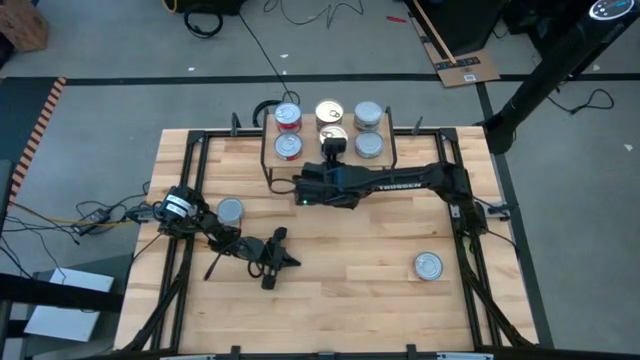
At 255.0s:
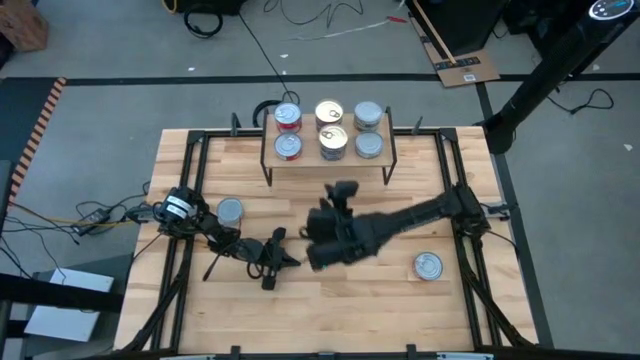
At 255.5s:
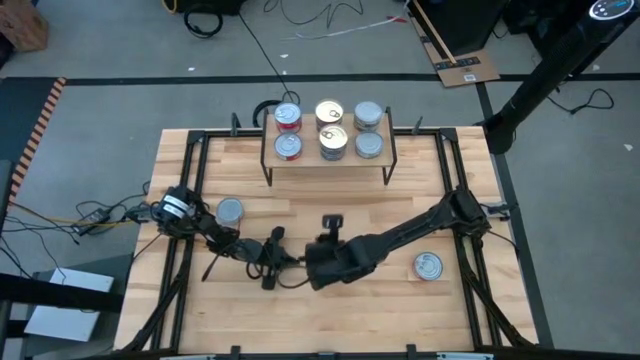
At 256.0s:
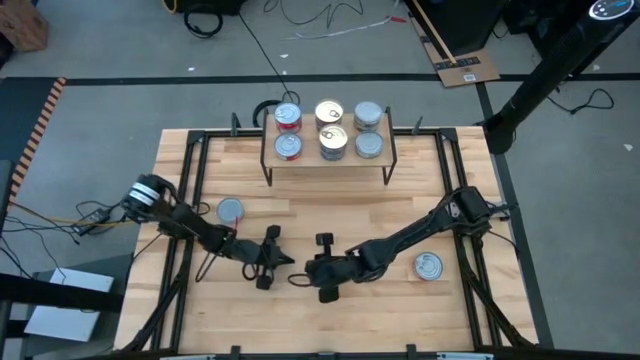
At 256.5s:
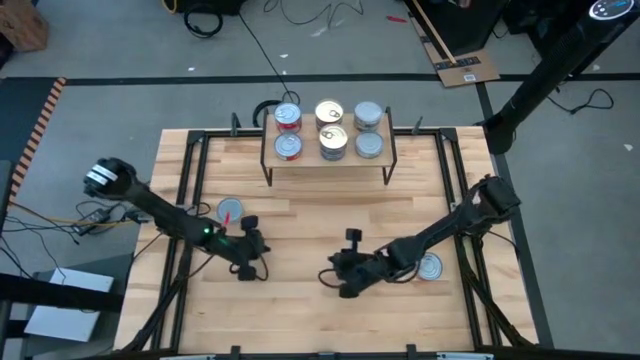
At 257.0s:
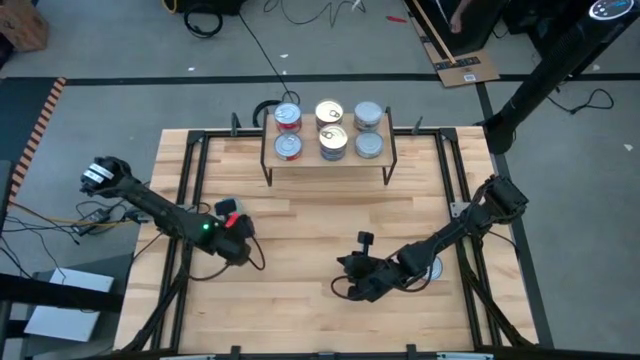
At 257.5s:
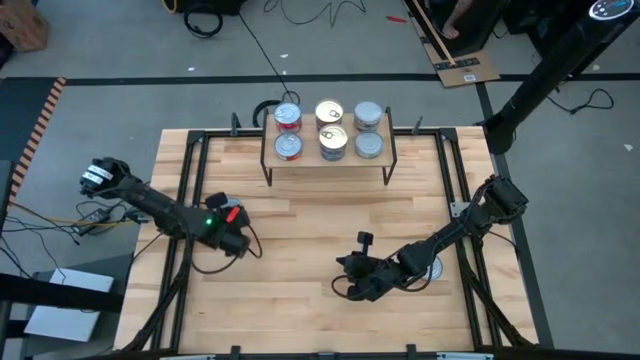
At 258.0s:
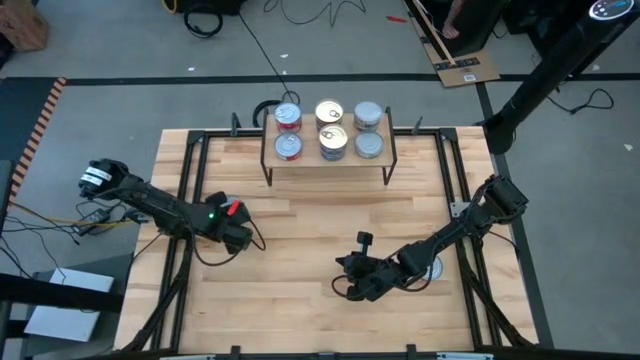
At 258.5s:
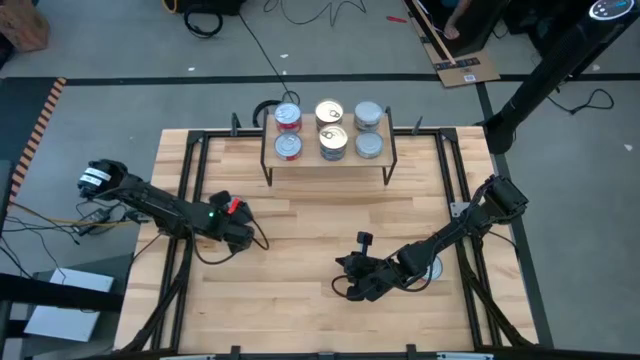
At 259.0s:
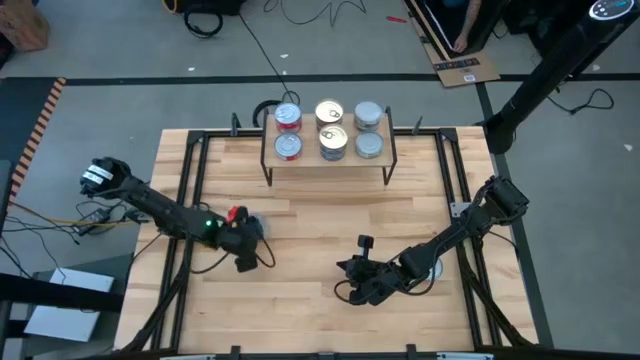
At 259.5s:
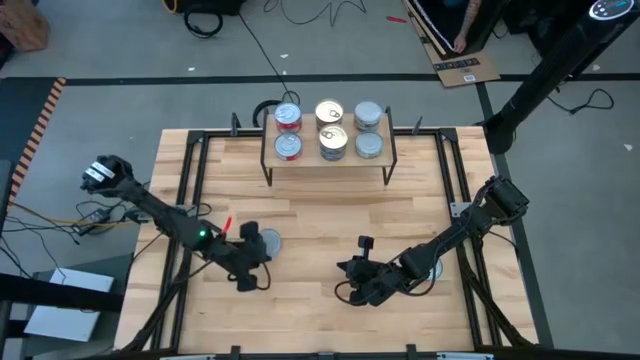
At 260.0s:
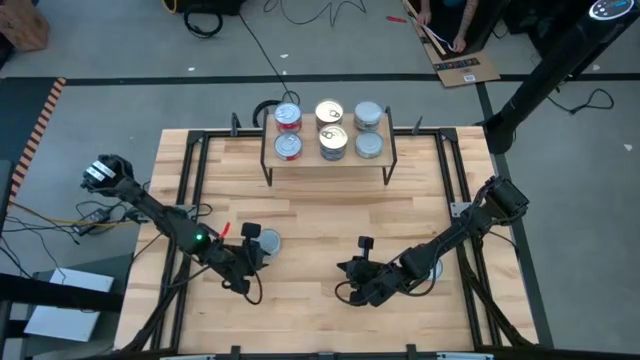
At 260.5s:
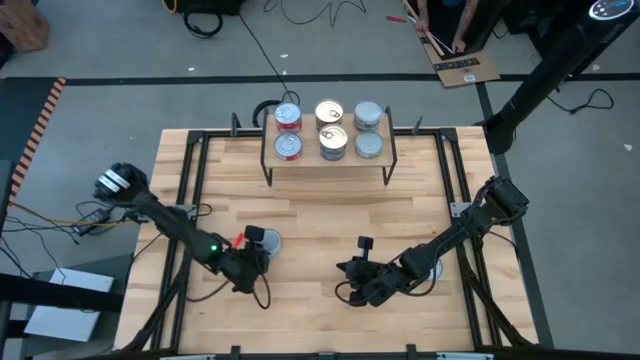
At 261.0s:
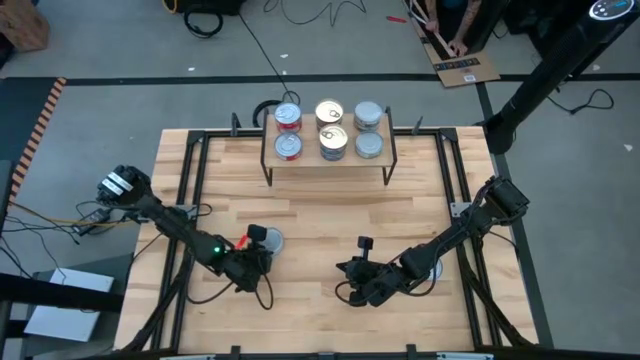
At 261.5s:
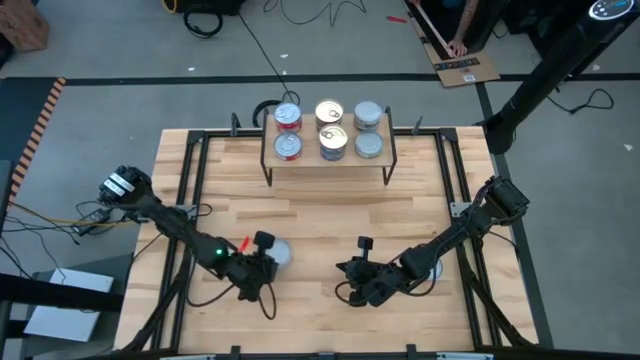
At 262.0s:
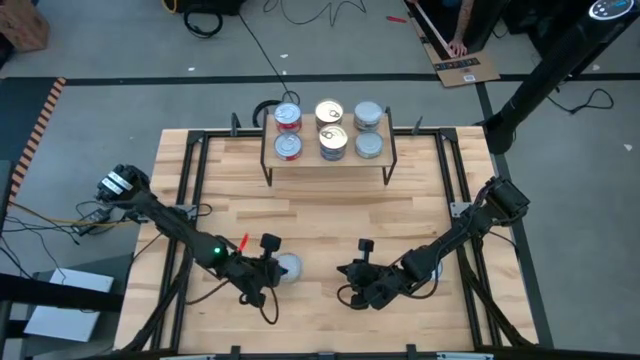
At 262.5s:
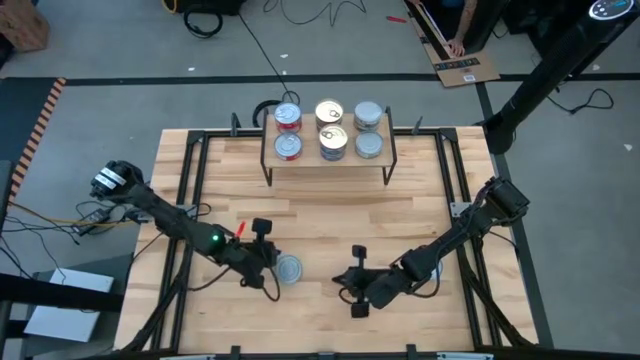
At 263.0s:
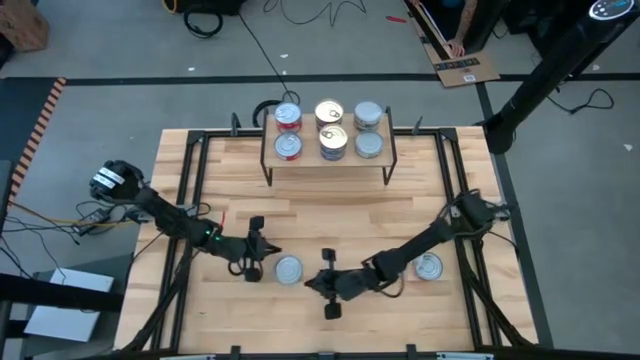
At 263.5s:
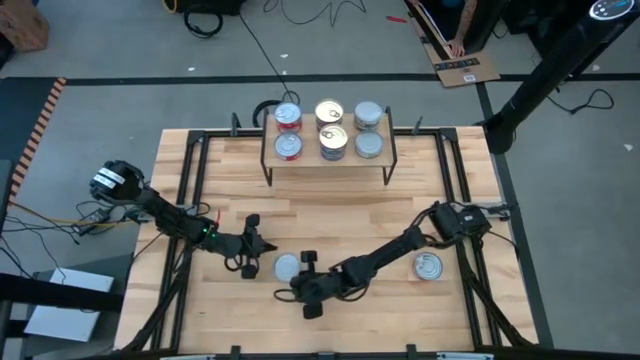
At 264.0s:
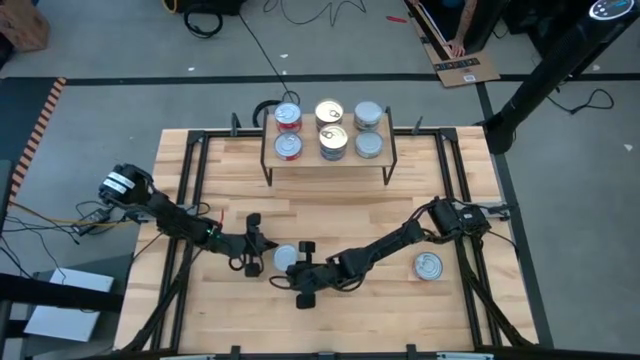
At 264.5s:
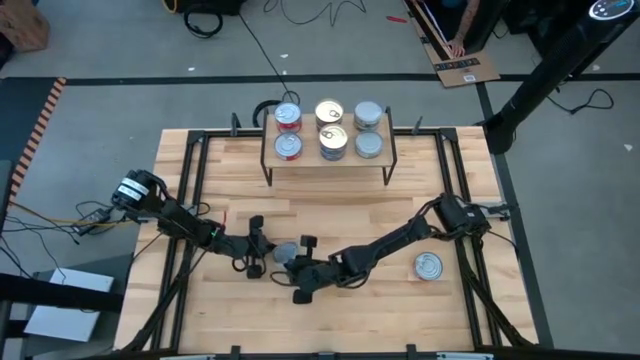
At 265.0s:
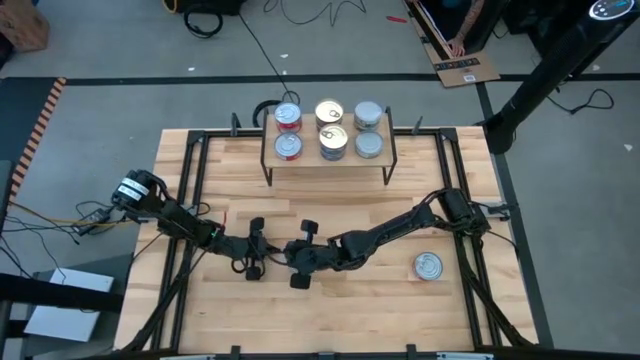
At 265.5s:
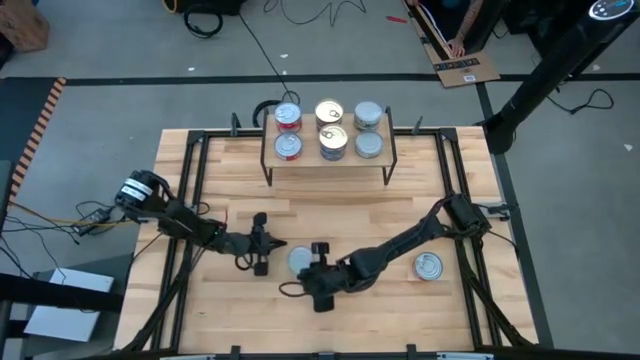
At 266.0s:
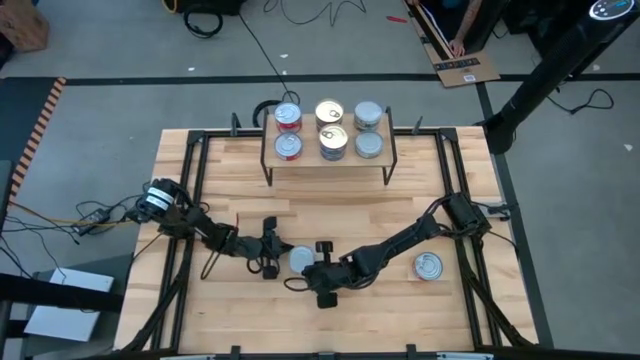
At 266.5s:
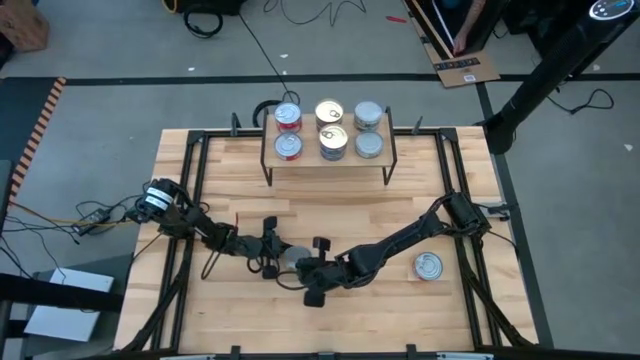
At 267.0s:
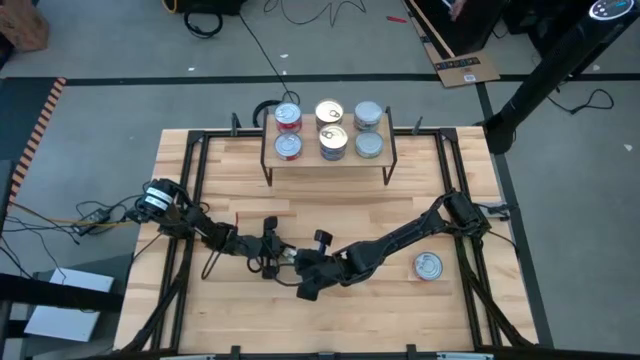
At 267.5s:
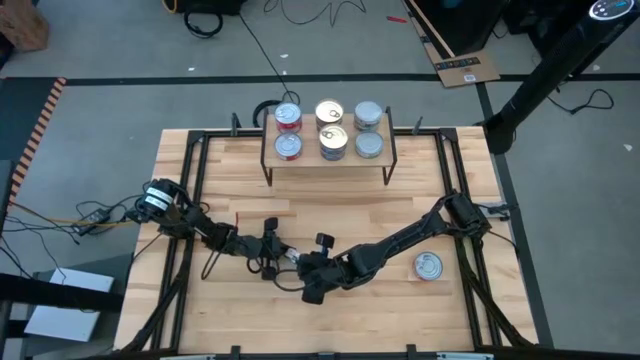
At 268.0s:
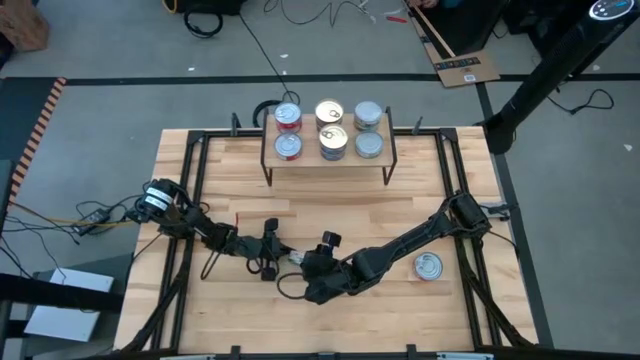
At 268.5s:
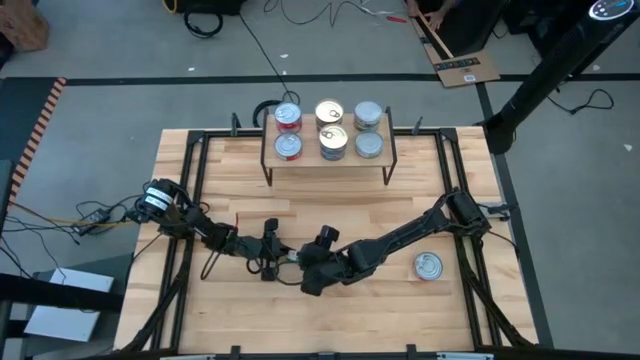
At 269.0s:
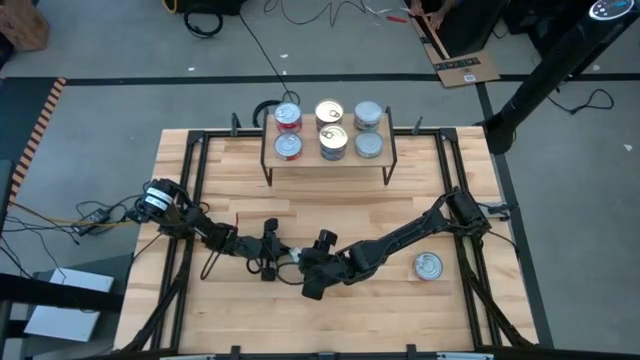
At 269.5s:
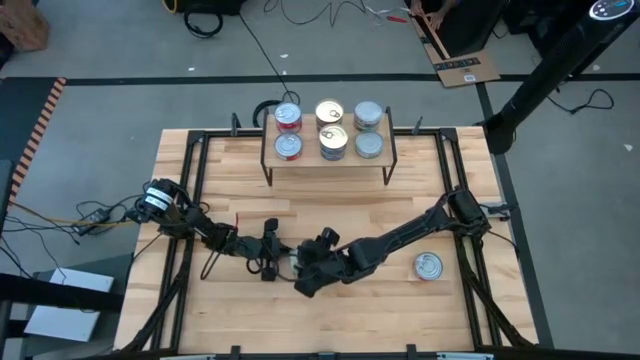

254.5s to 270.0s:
Task: Stack canned seafood by type on shelf
Stack the green tuna can on top of the green tuna can on the shelf

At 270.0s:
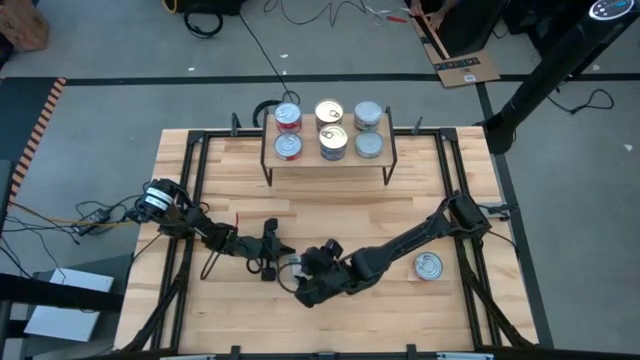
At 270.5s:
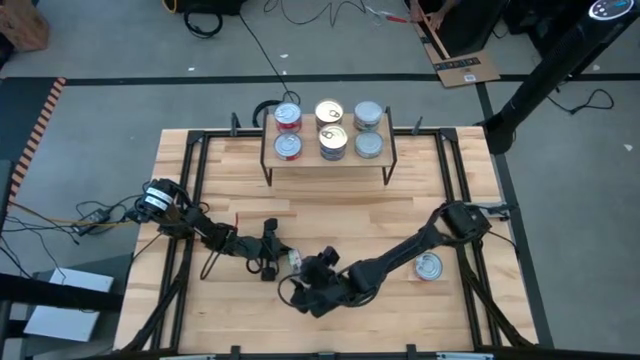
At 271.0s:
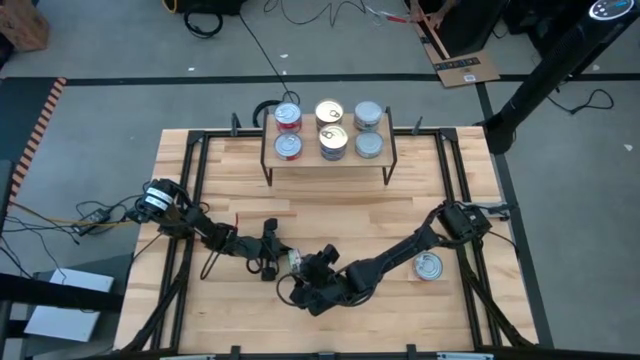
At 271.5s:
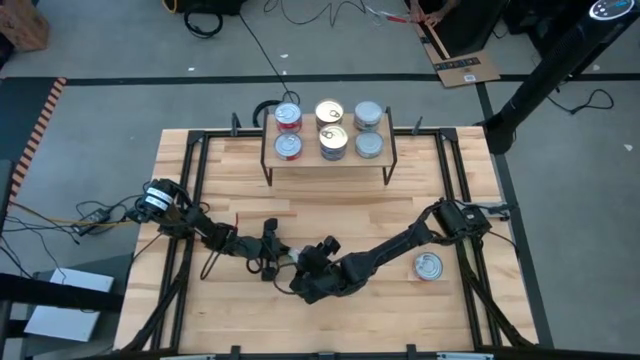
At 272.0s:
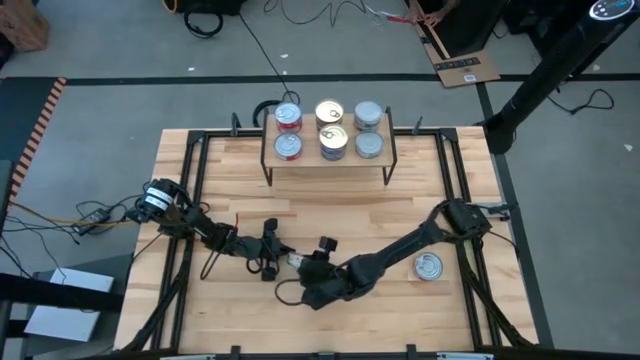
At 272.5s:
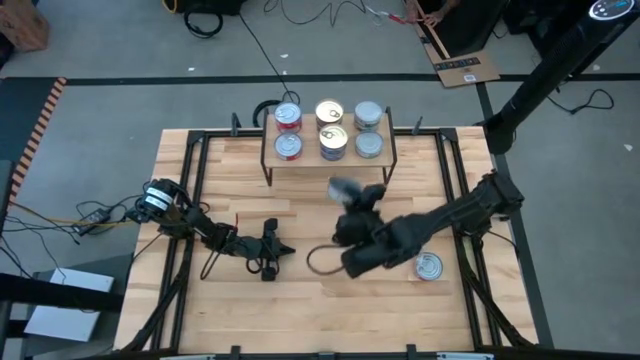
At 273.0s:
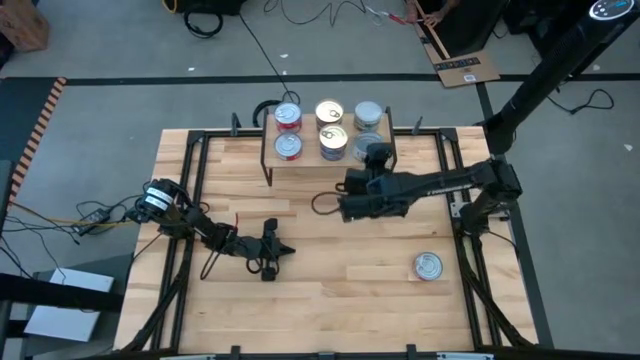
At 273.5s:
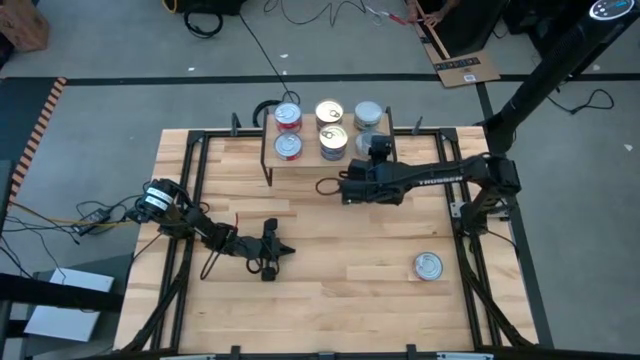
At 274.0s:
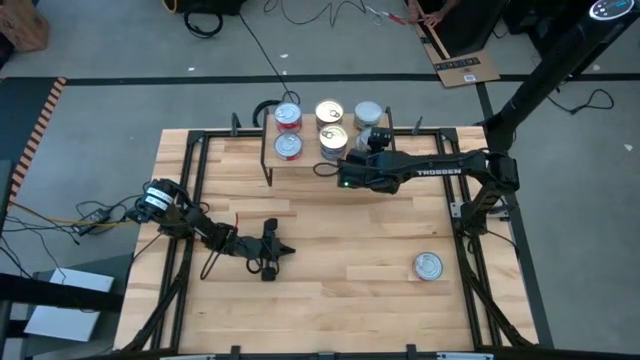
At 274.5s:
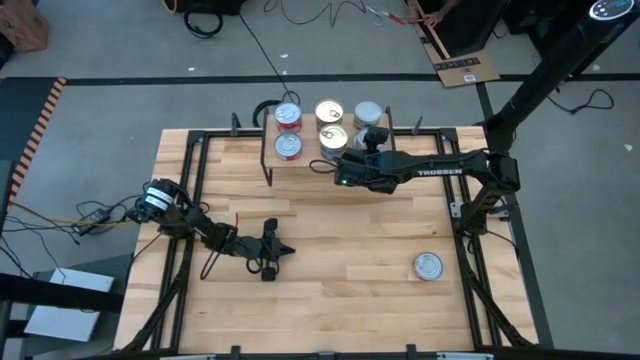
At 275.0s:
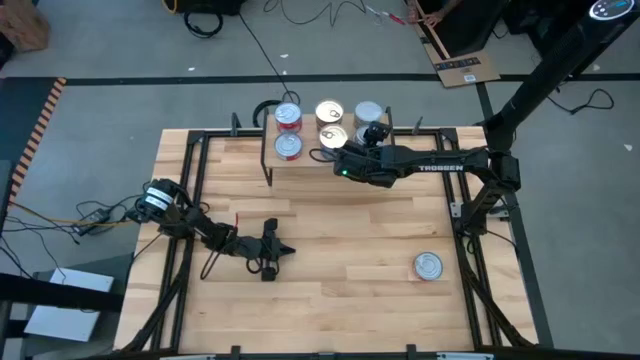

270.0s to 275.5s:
Stack the green tuna can on top of the green tuna can on the shelf
